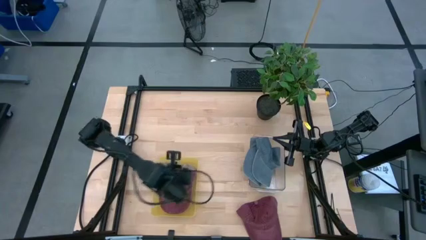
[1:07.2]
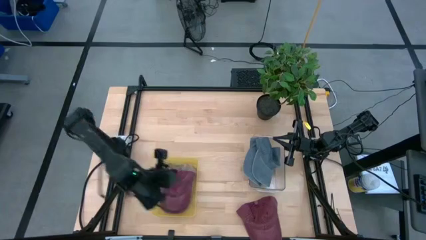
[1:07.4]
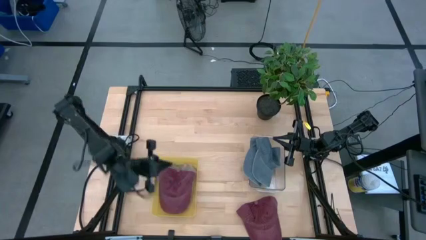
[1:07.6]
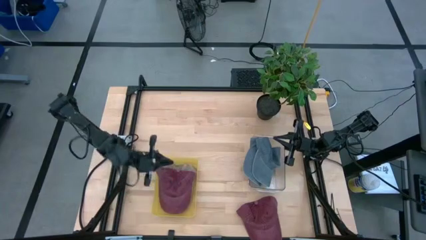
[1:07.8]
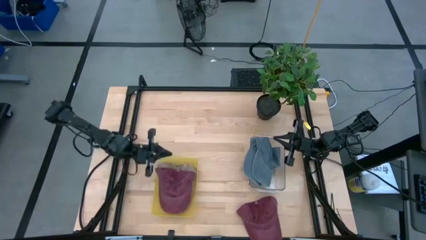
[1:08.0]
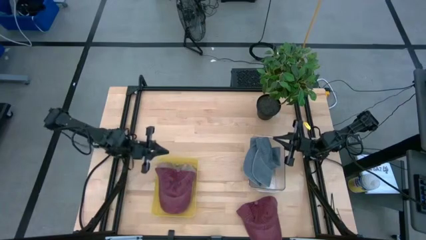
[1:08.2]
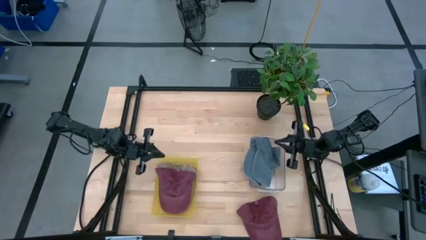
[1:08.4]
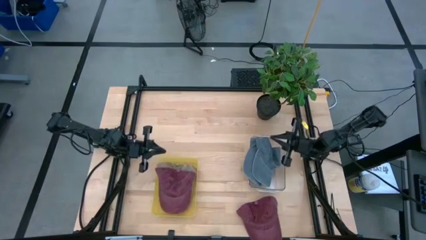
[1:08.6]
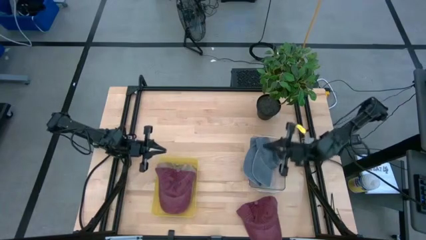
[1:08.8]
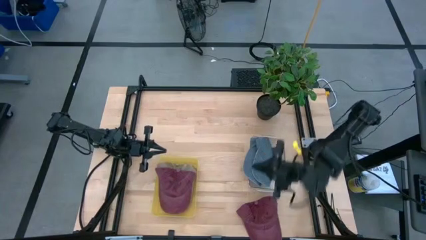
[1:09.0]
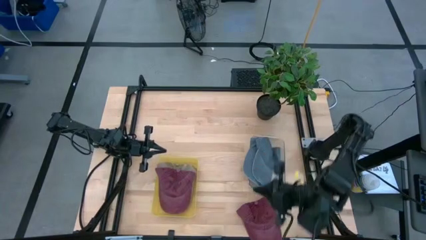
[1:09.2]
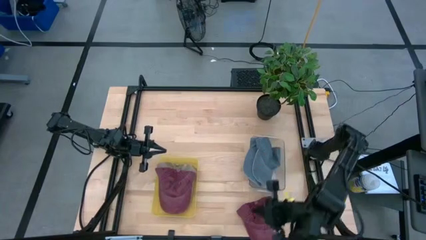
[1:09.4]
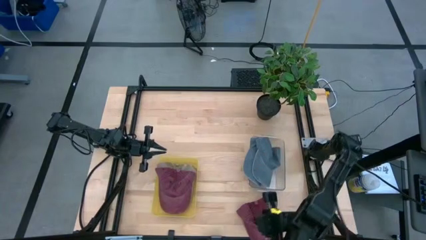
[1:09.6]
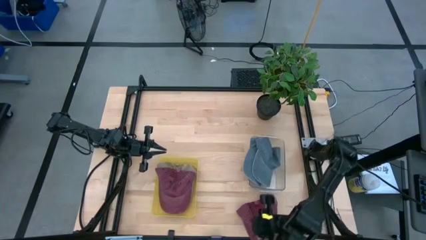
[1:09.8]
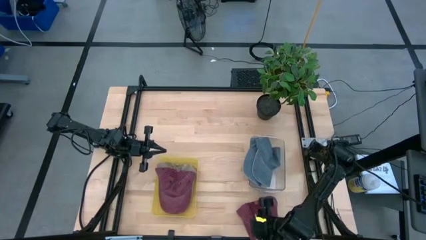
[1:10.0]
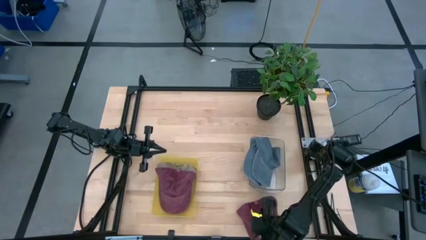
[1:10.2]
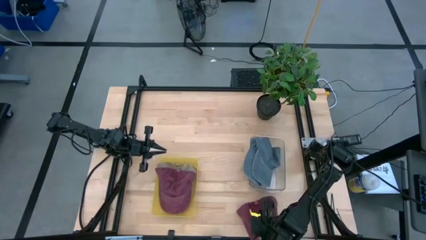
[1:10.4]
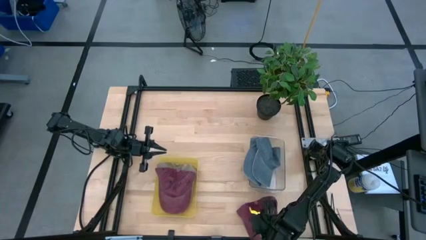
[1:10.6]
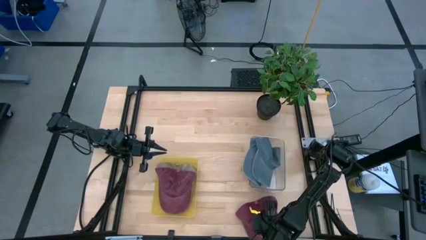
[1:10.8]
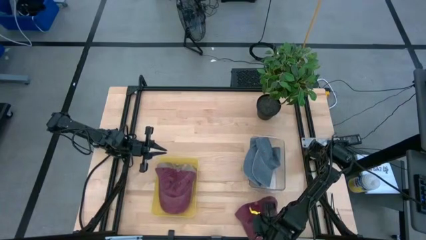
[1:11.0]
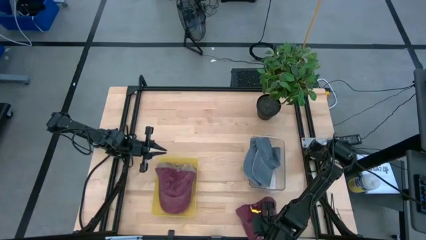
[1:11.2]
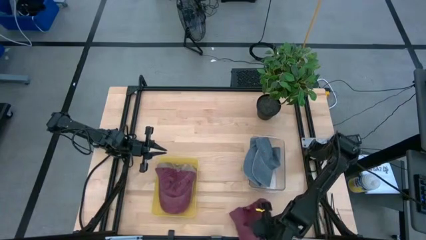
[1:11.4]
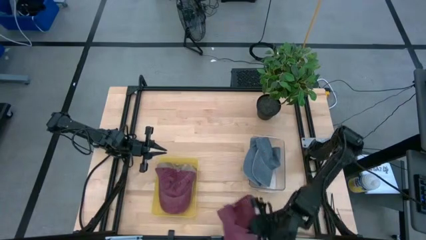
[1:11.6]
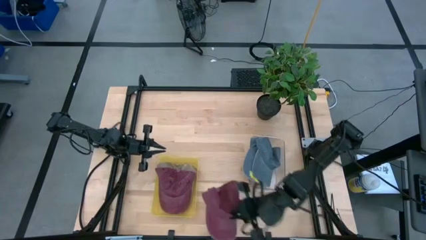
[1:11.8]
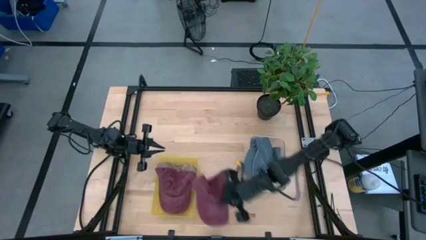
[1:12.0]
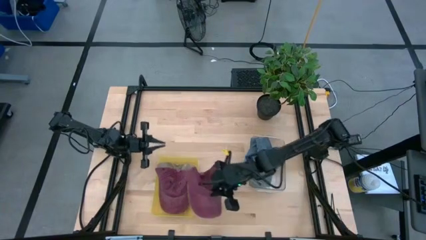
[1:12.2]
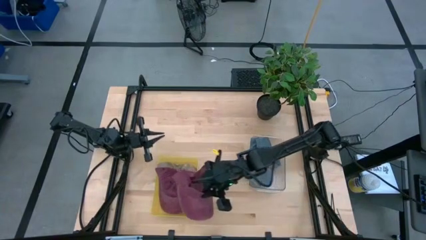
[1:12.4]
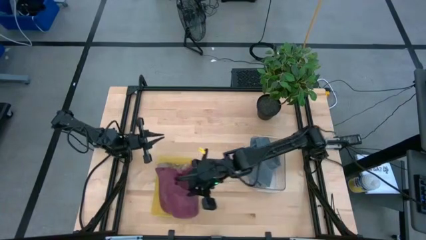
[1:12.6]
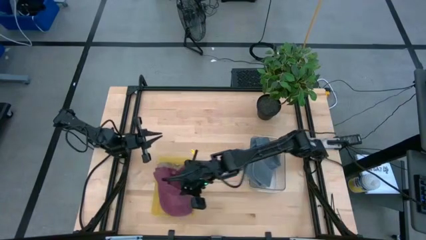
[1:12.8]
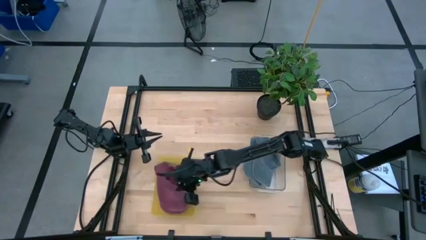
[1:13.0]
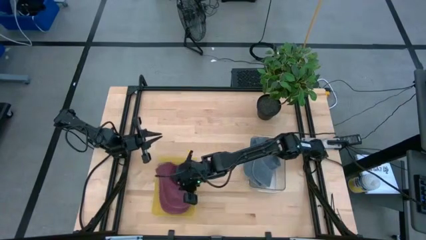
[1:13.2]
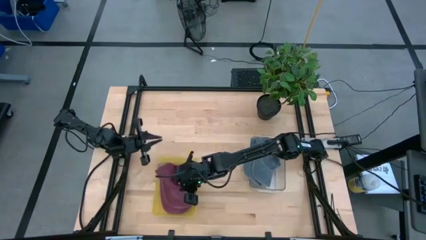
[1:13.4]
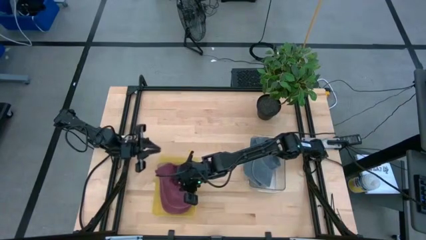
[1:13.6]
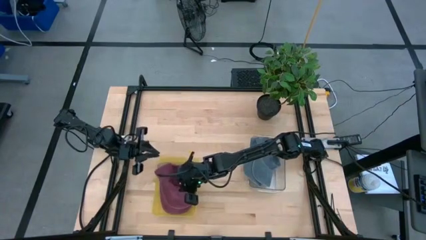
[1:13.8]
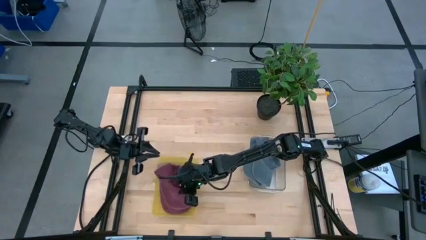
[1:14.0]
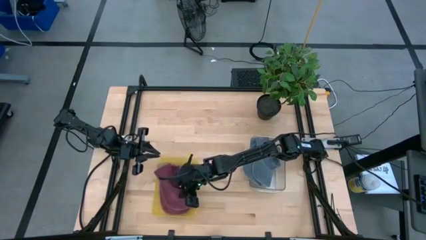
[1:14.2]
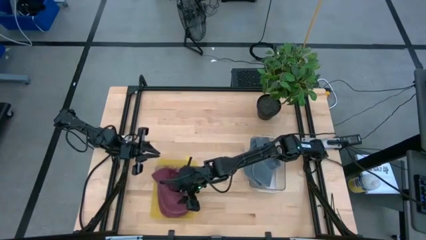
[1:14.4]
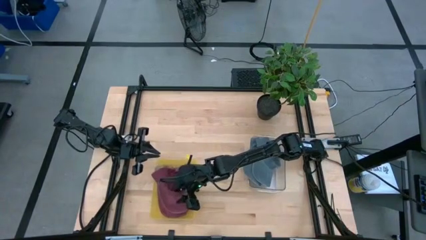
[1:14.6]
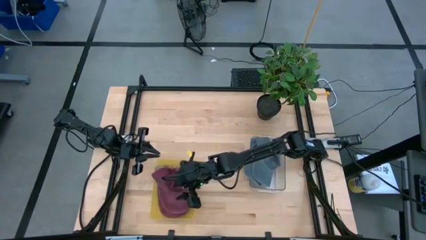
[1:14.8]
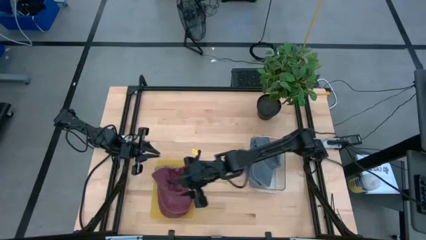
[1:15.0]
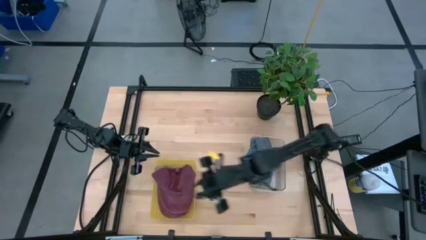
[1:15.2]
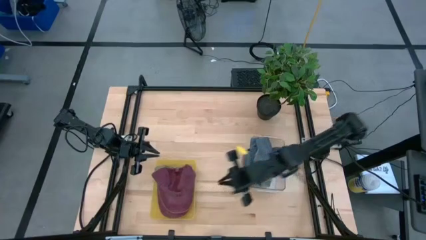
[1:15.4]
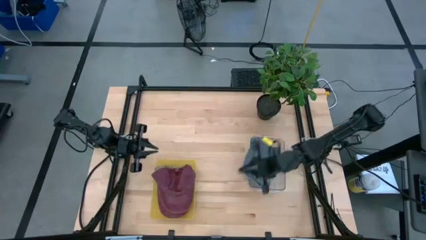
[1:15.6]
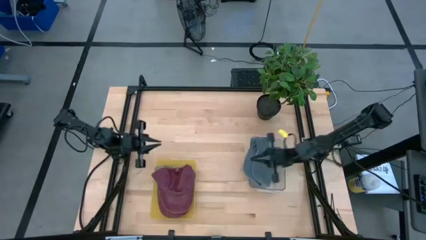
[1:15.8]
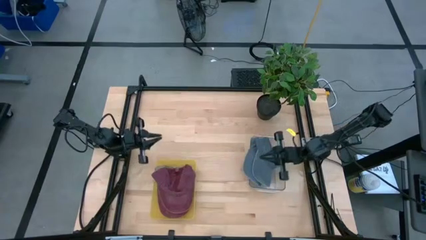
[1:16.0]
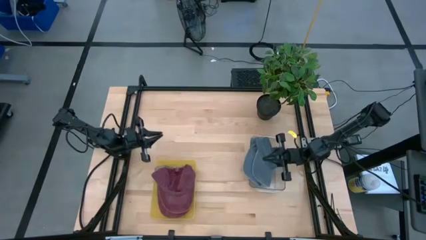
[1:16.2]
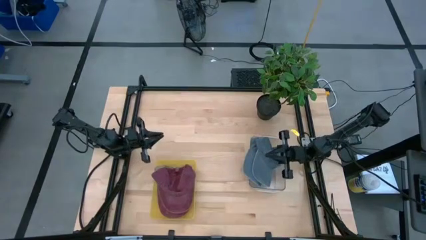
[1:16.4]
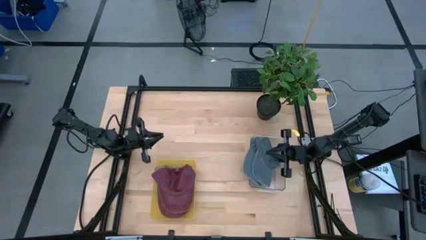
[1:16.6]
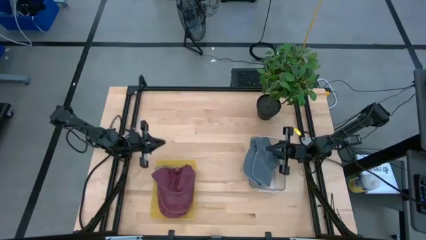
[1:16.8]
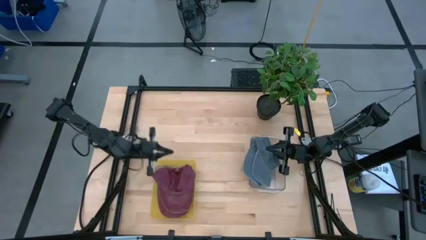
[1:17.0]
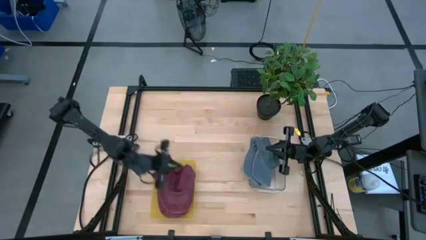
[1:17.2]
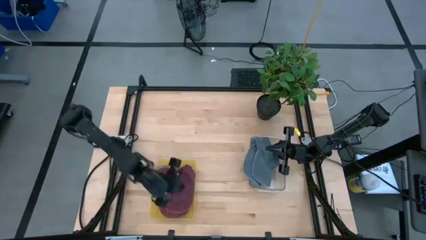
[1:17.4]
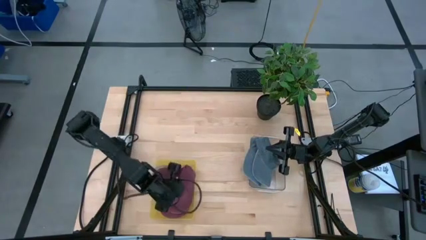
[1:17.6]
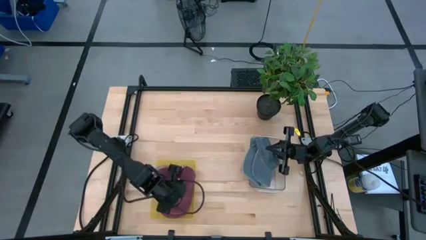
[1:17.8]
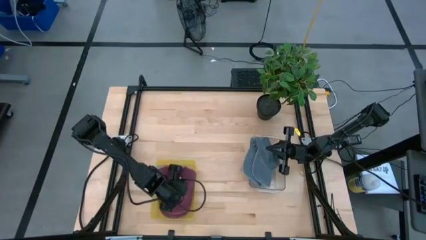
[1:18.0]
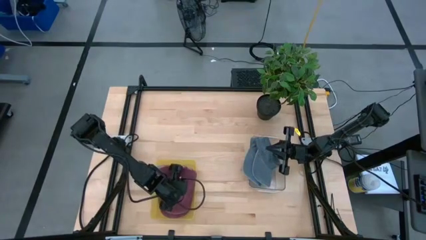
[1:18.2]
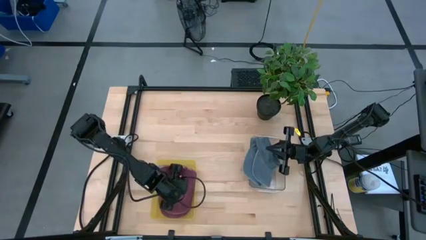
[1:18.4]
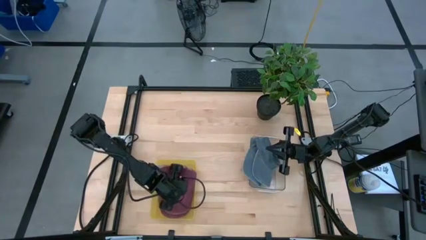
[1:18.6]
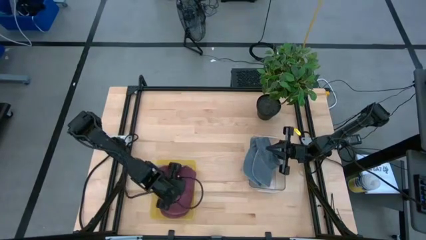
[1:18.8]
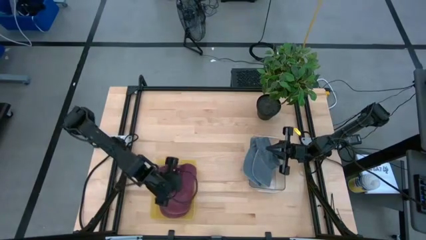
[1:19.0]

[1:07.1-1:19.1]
Task: Pick & Place hat
Put the red cap into the yellow bin
